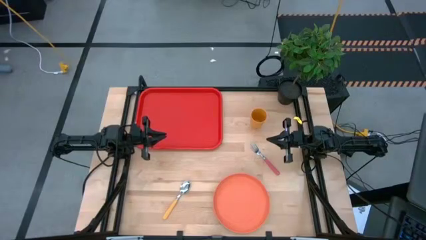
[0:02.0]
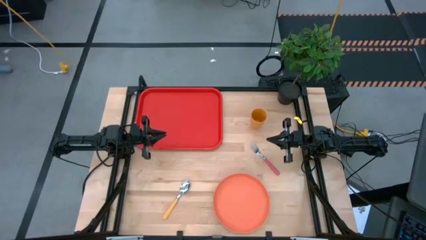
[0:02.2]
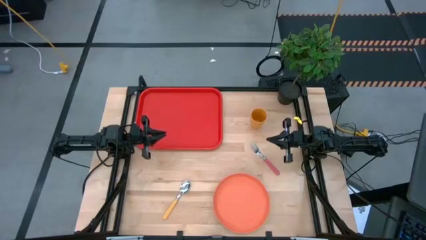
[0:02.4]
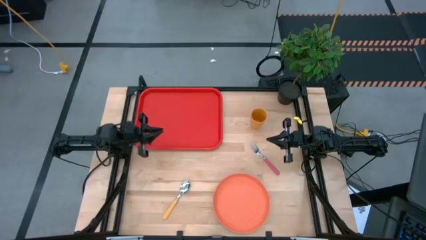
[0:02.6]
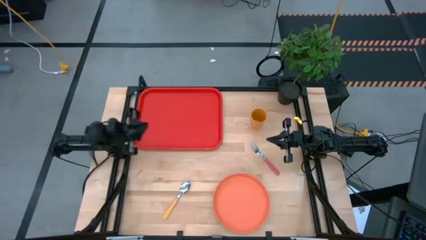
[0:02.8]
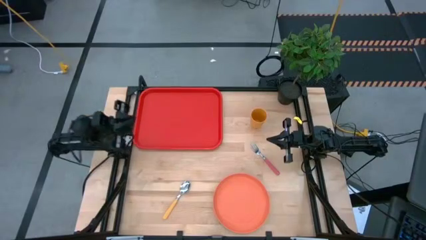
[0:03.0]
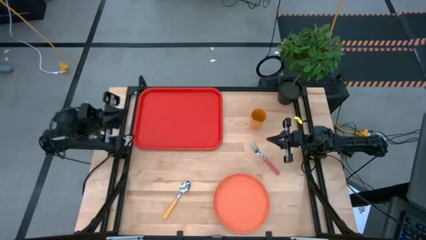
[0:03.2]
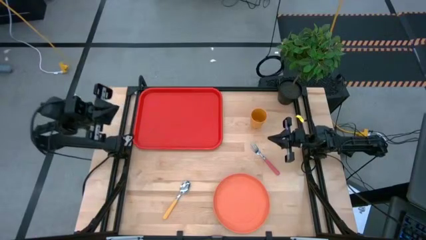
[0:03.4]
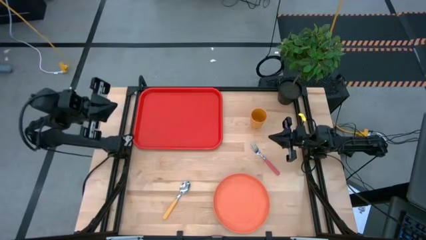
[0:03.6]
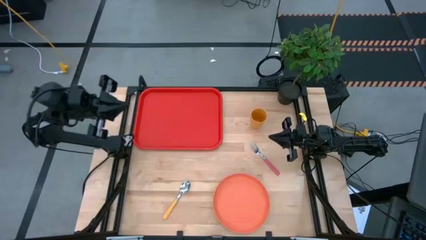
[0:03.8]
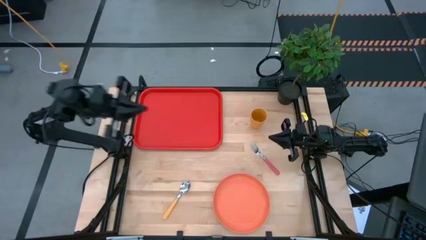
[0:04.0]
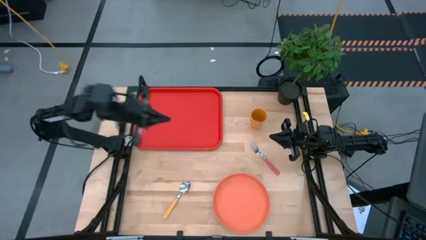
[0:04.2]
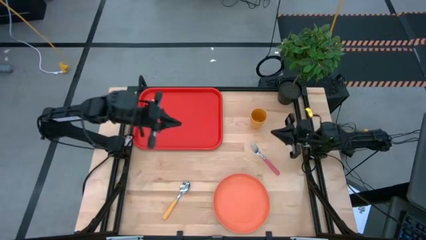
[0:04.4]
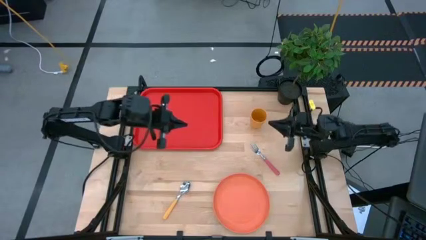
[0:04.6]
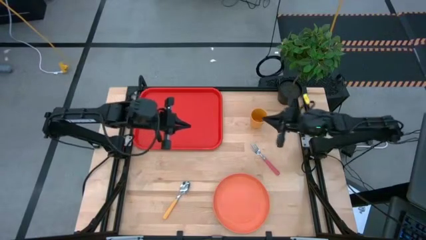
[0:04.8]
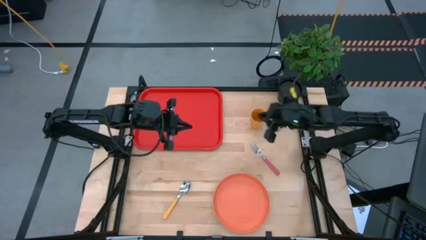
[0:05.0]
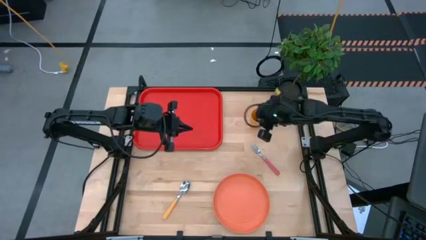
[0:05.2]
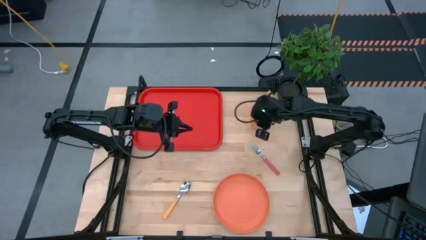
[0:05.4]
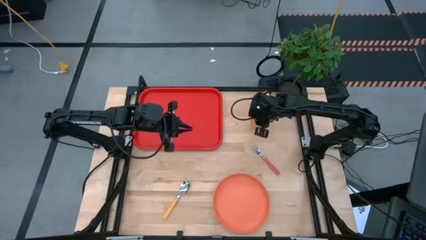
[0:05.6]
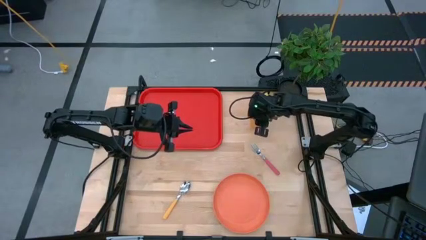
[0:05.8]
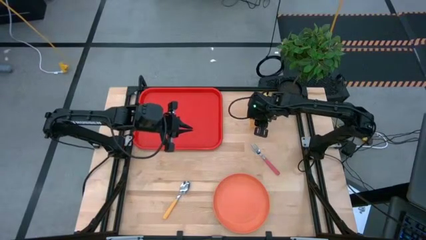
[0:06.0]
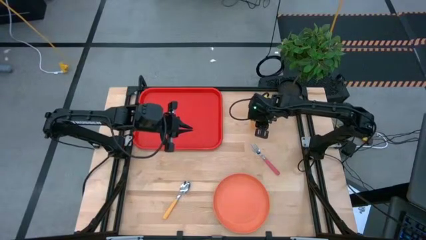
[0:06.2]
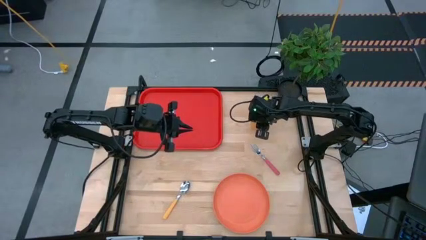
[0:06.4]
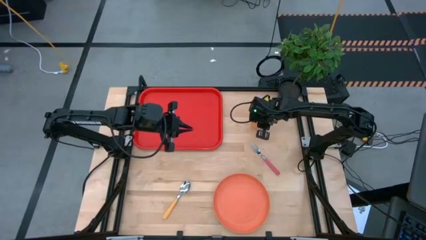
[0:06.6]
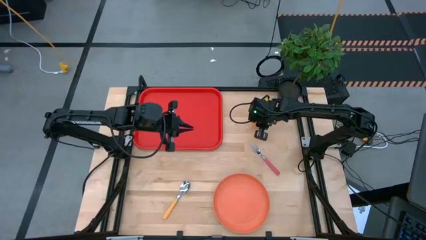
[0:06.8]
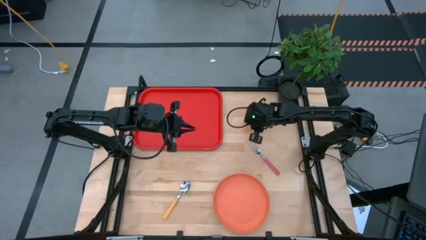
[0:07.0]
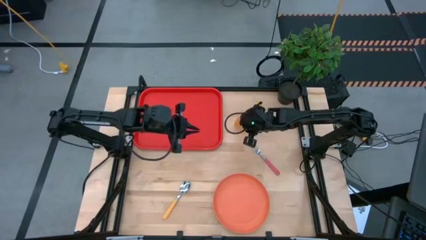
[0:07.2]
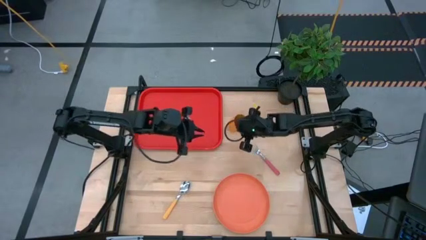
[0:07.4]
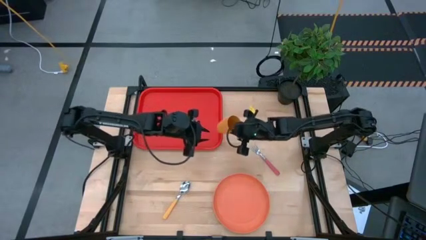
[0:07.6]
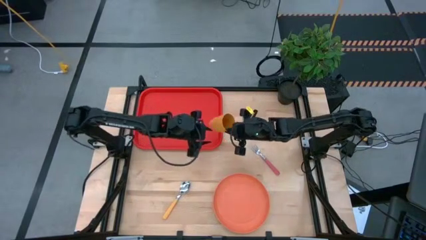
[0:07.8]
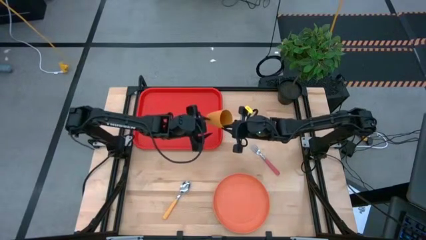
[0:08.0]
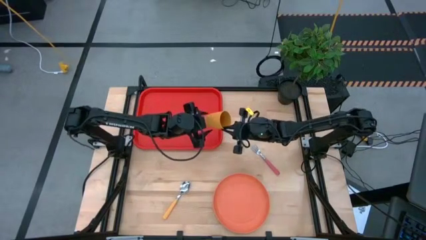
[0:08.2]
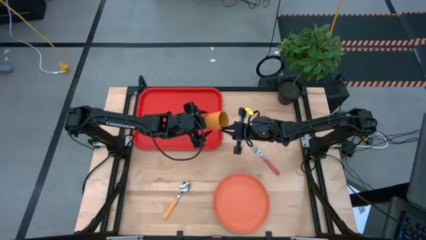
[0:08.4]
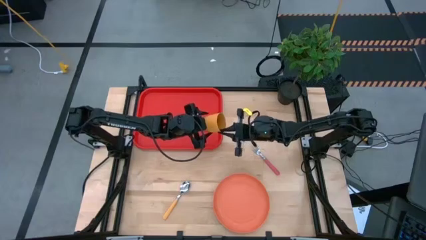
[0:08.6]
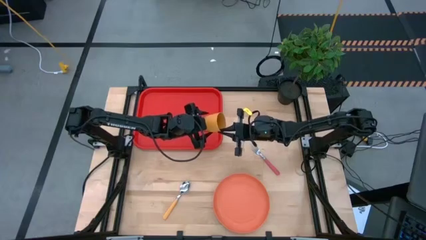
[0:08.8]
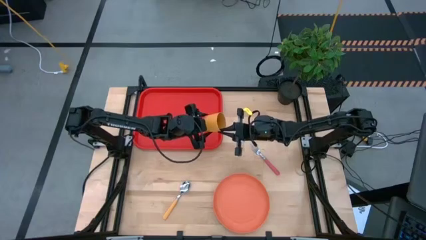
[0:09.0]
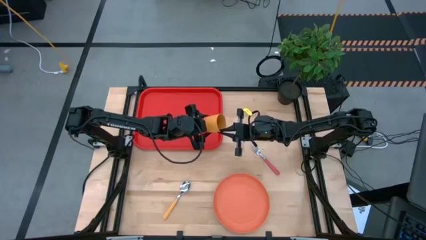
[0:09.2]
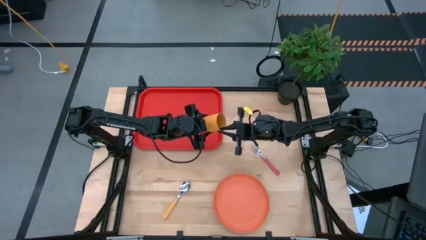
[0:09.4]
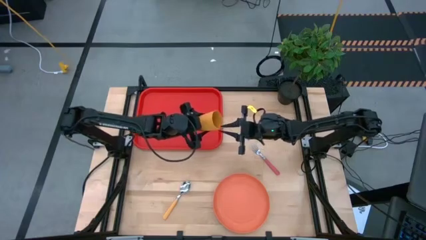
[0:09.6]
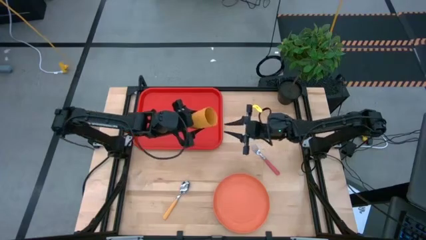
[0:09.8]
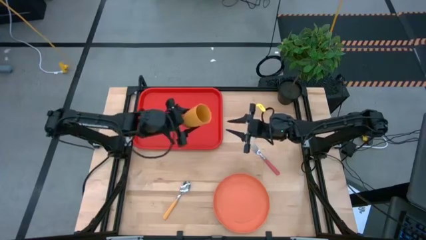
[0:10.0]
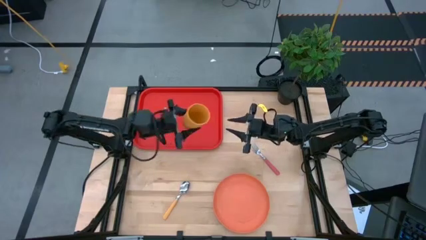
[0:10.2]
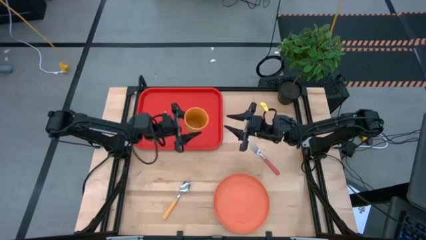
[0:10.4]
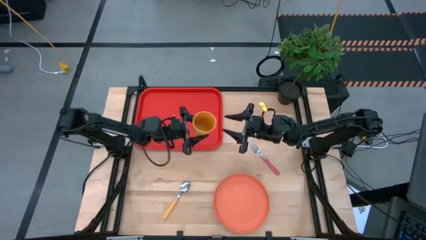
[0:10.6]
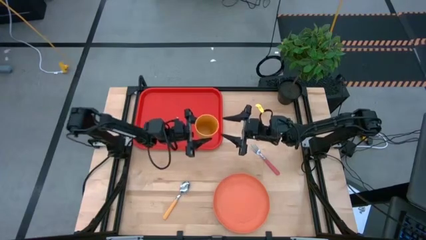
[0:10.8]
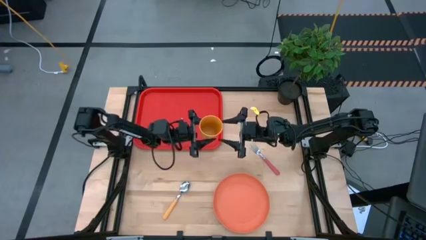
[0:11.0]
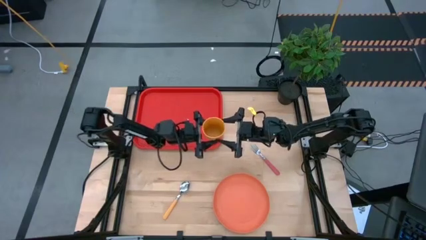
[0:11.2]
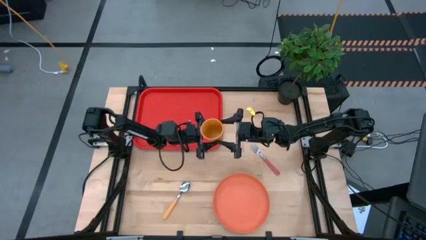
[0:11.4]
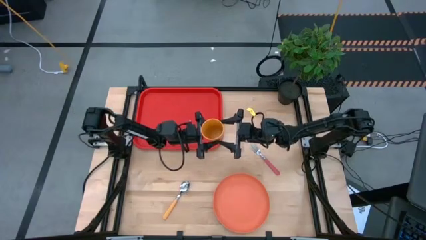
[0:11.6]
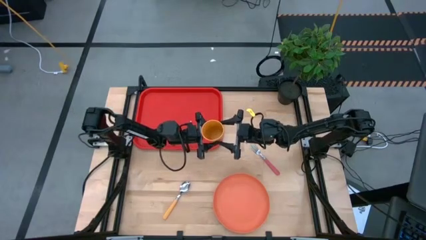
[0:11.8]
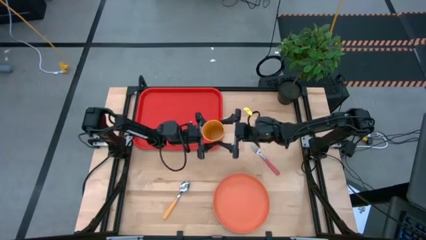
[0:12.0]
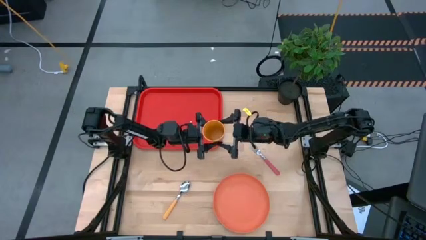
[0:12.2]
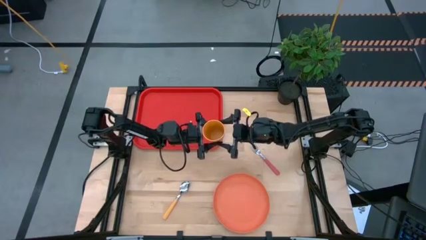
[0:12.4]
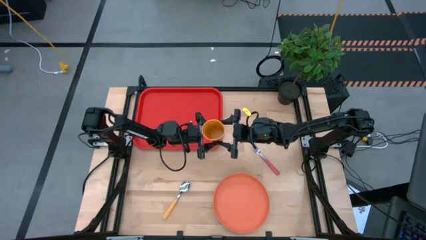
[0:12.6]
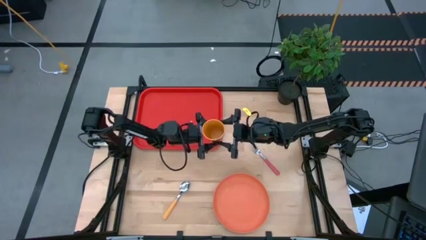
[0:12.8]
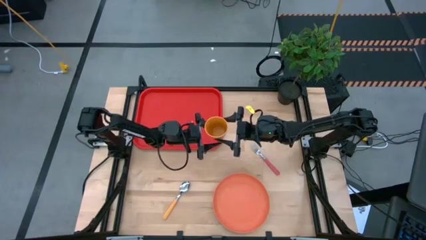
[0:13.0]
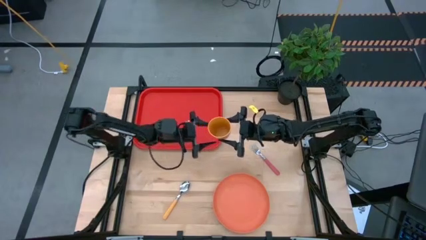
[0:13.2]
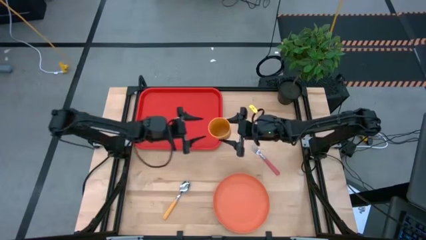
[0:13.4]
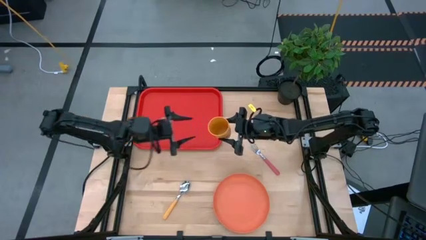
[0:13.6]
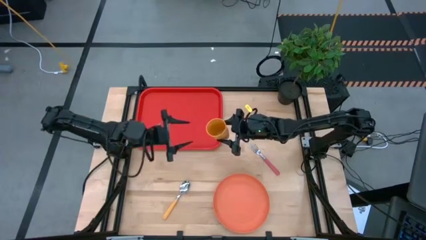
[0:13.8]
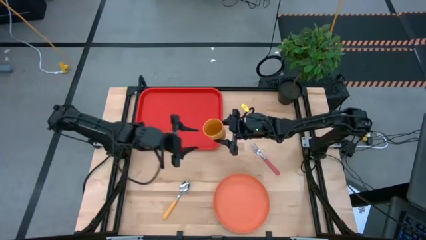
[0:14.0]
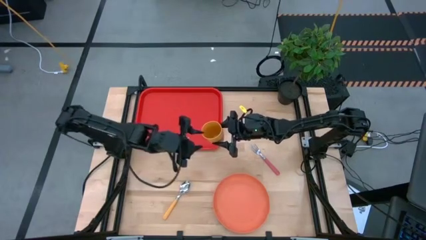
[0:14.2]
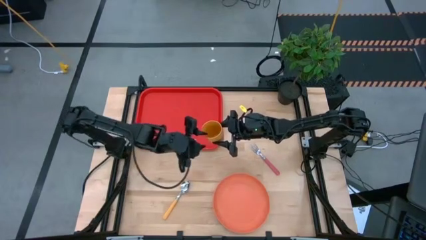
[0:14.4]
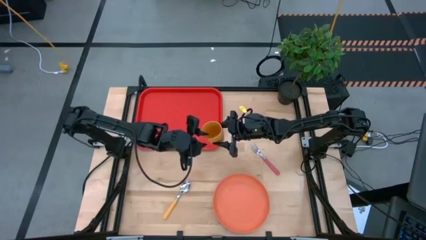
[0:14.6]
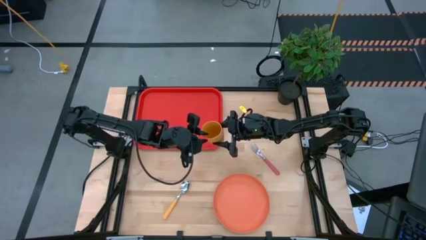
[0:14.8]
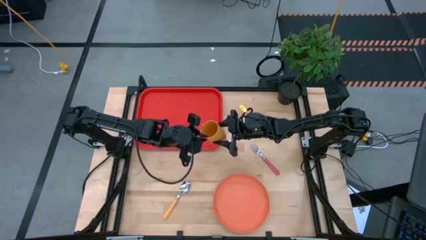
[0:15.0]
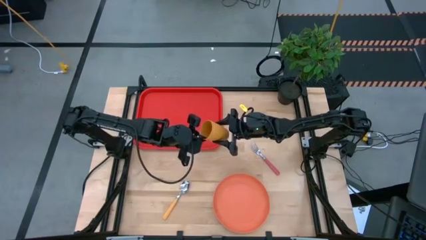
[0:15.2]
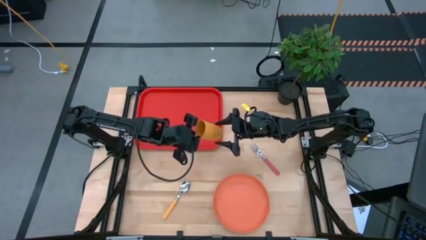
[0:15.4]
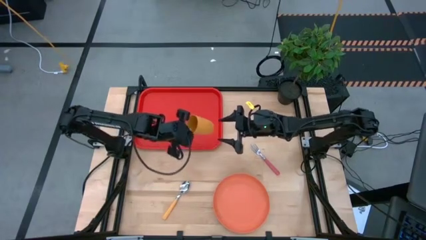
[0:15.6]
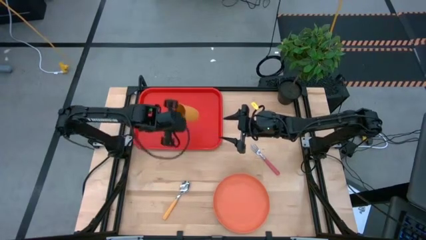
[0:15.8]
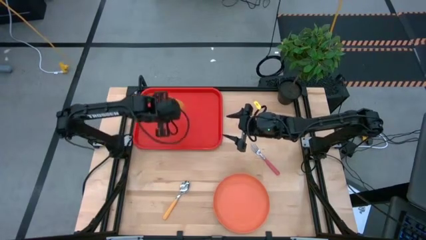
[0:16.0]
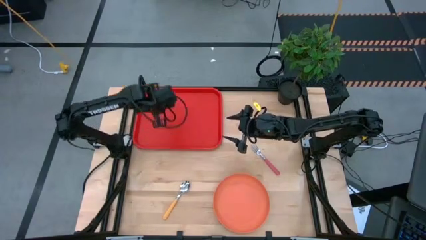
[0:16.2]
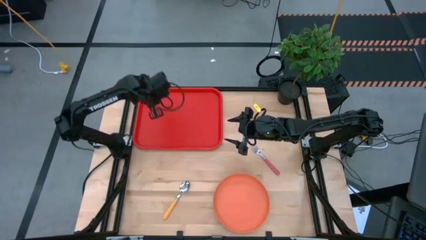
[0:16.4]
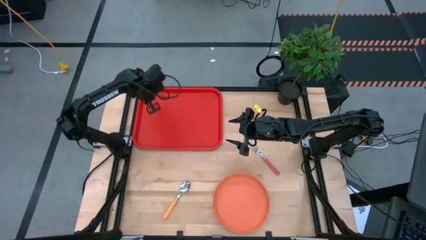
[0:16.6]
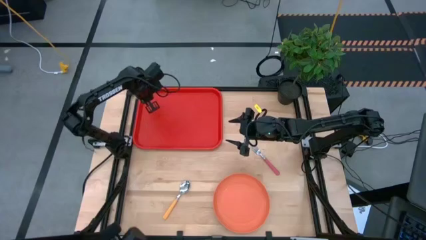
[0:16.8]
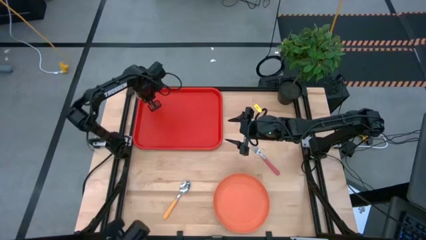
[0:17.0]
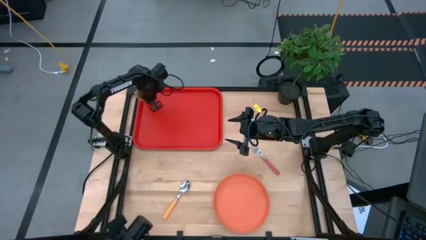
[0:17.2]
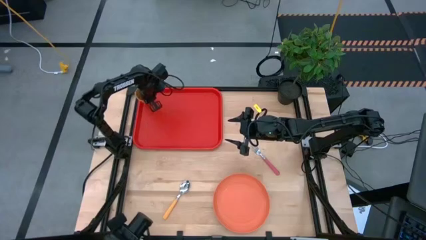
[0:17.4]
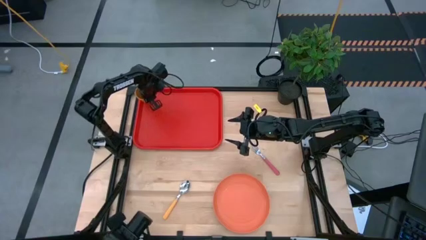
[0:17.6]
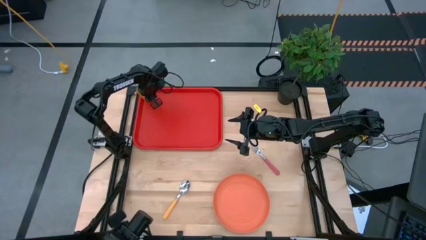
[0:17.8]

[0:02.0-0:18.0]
Task: Pick and place plate/cup/fork/spoon on tray
Put the yellow cup on the red serving tray
